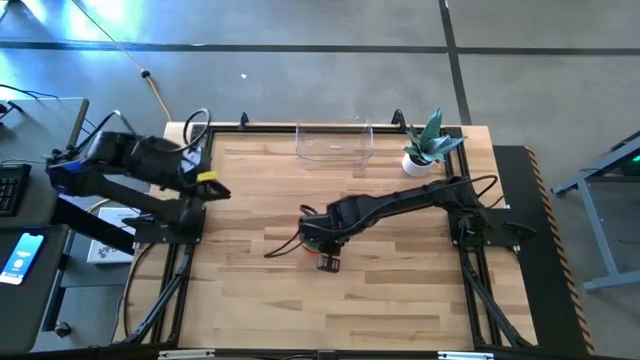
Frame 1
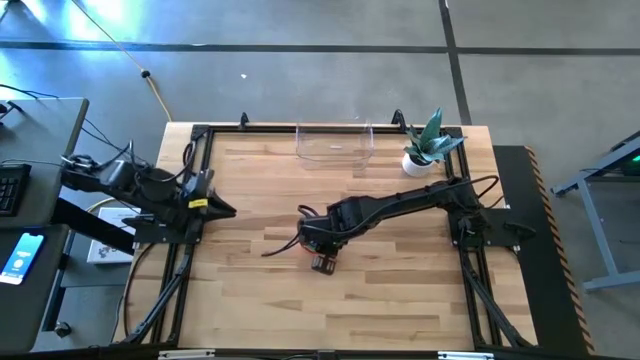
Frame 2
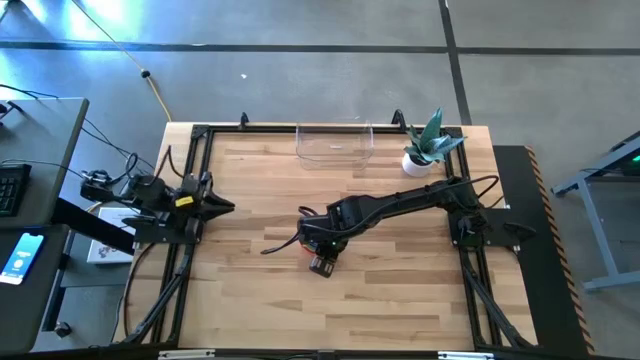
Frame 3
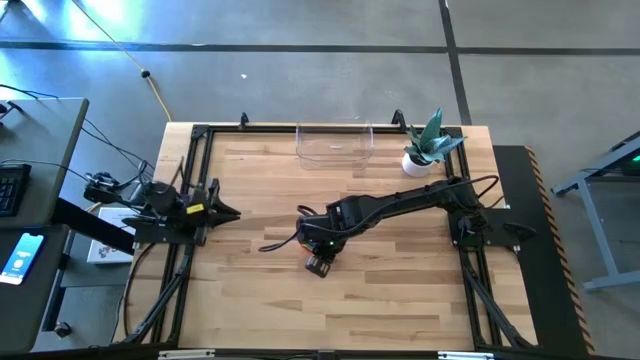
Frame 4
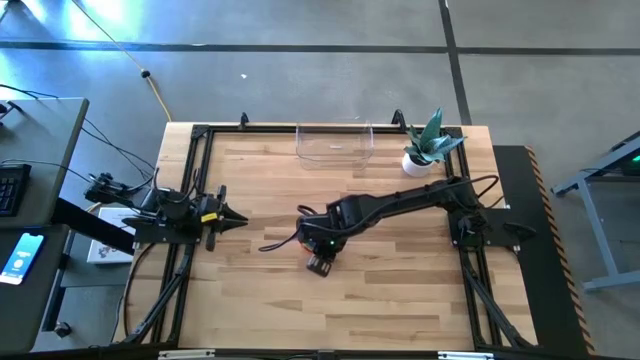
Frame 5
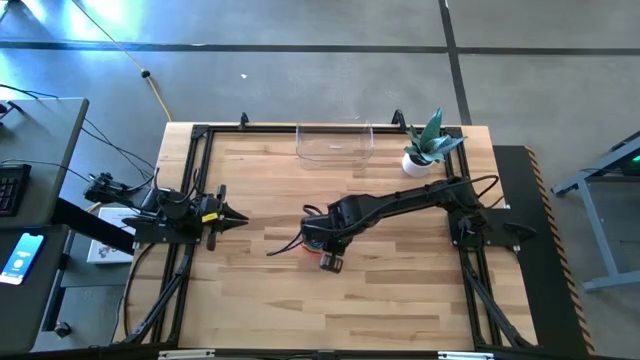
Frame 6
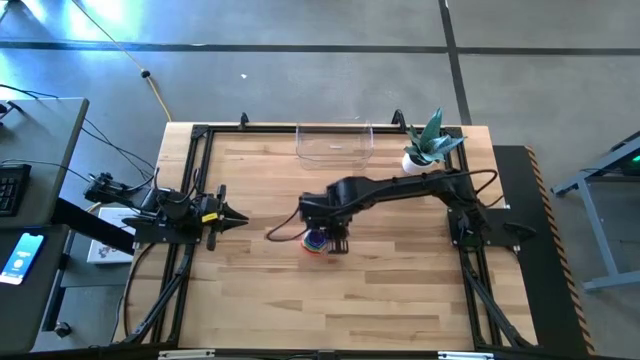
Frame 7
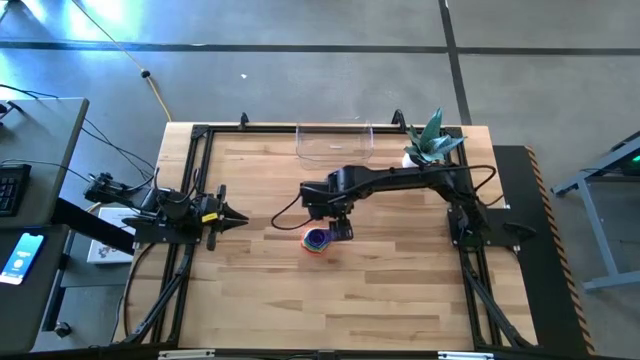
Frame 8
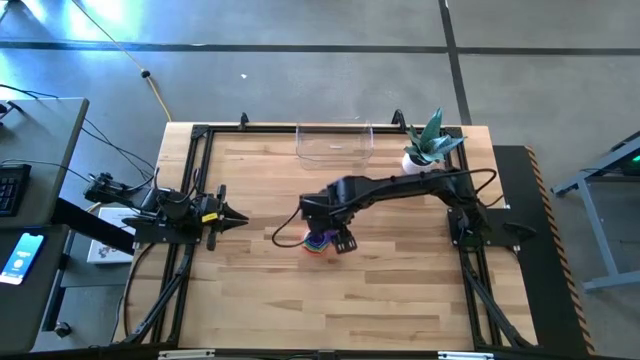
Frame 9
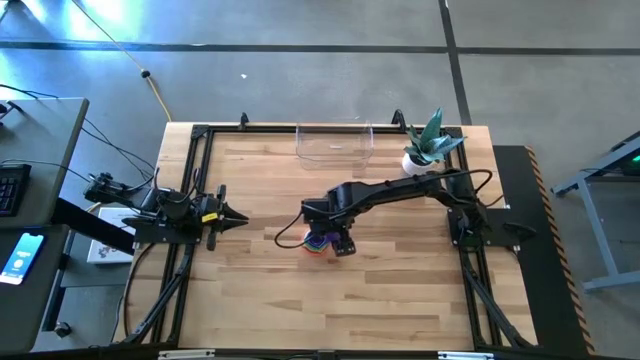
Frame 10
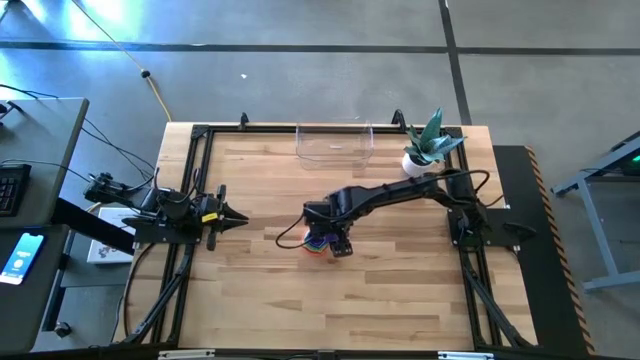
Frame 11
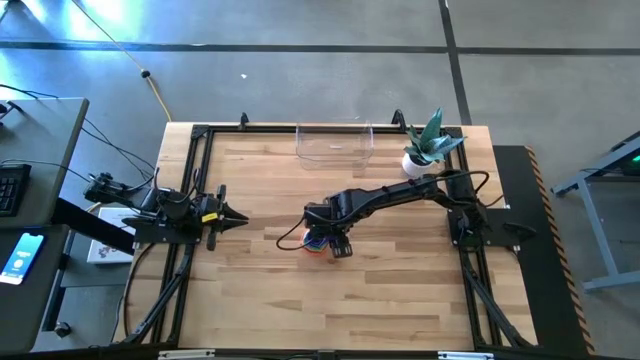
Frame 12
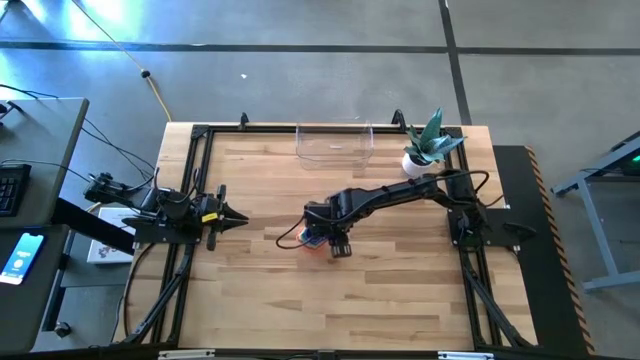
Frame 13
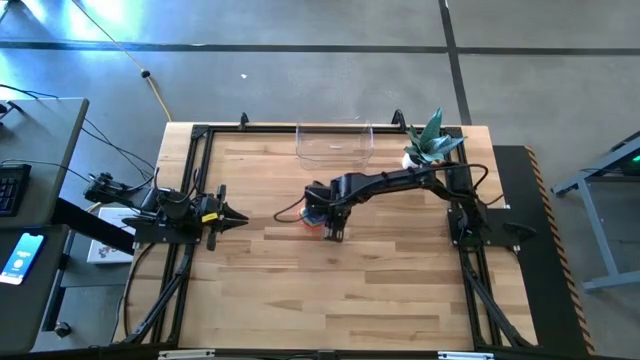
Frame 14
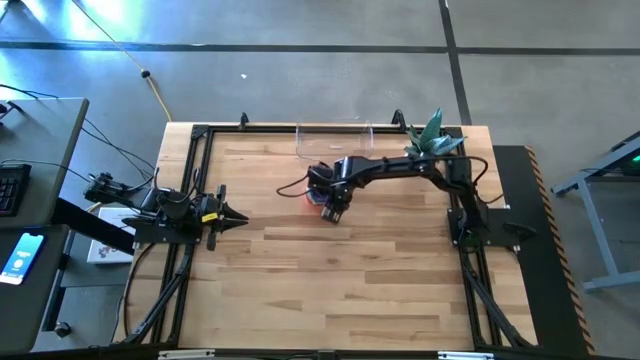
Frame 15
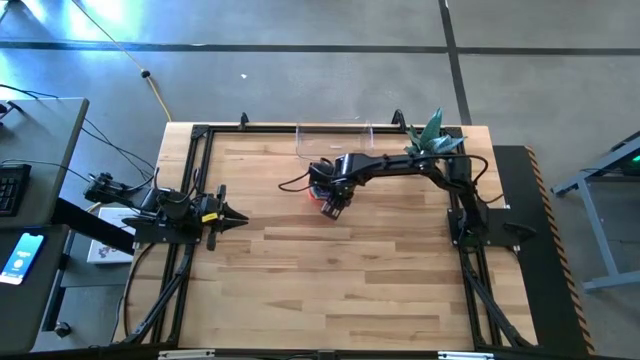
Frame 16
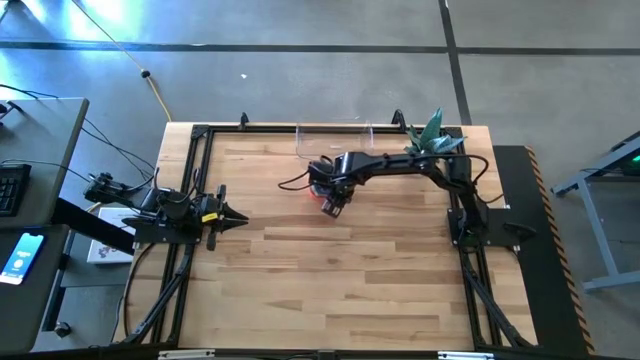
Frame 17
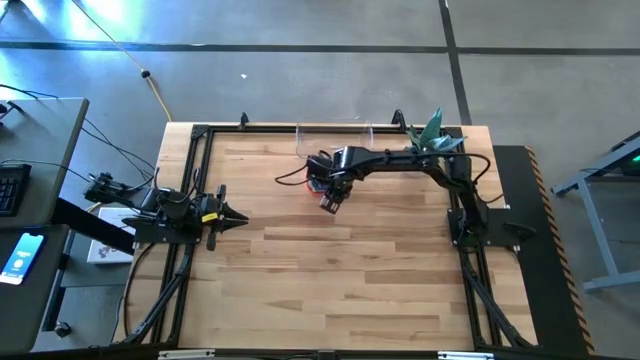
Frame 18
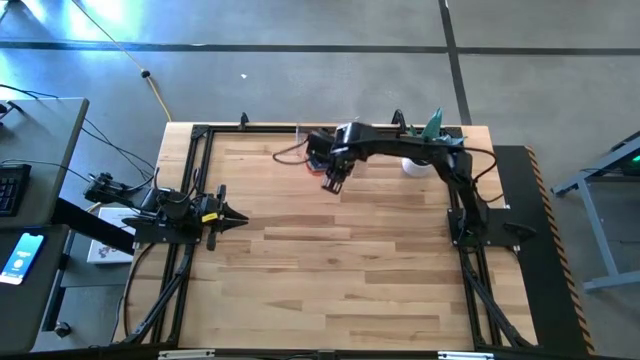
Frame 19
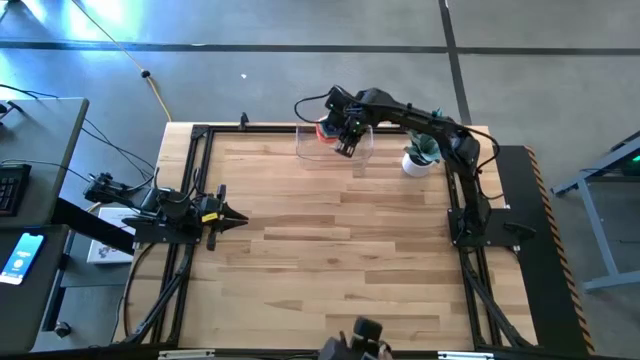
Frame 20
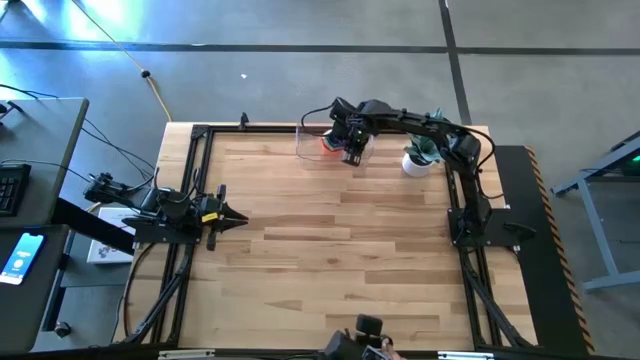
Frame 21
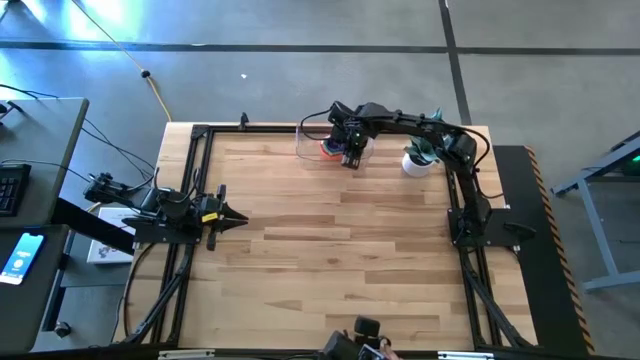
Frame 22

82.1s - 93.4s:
Task: Nest measuring cups in basket
Put the colored measuring cups on top of the transparent bin

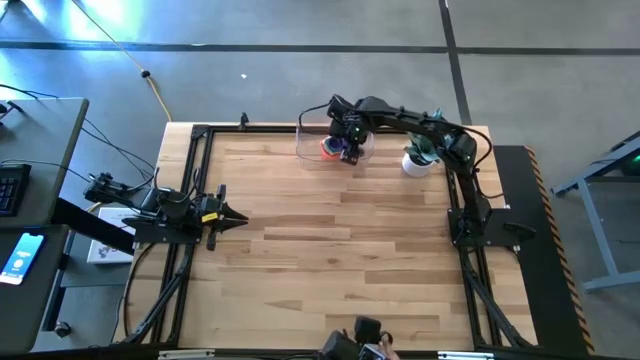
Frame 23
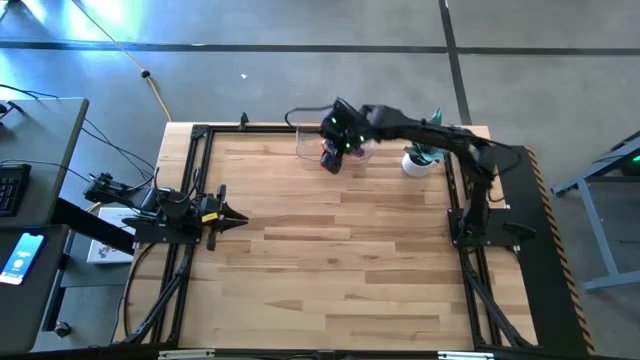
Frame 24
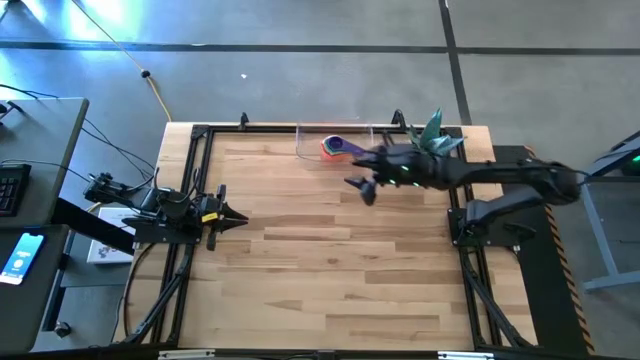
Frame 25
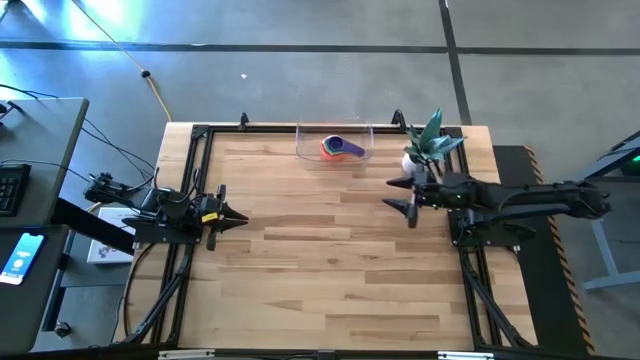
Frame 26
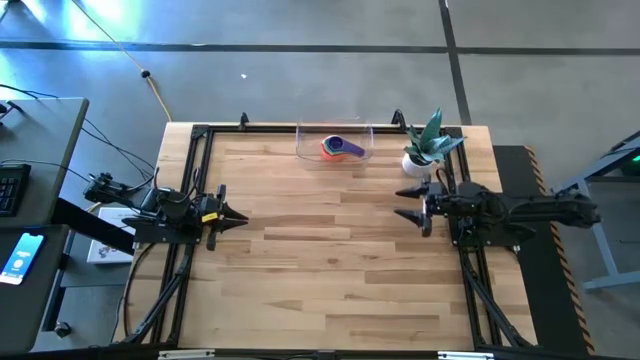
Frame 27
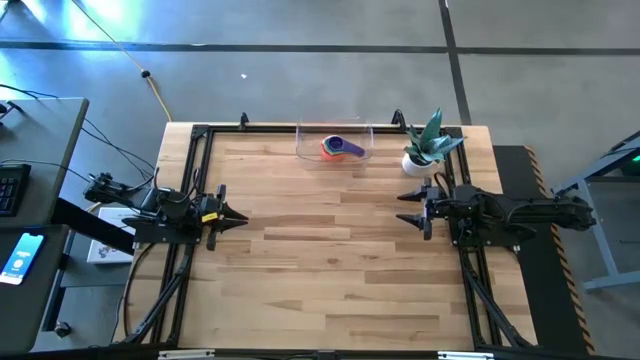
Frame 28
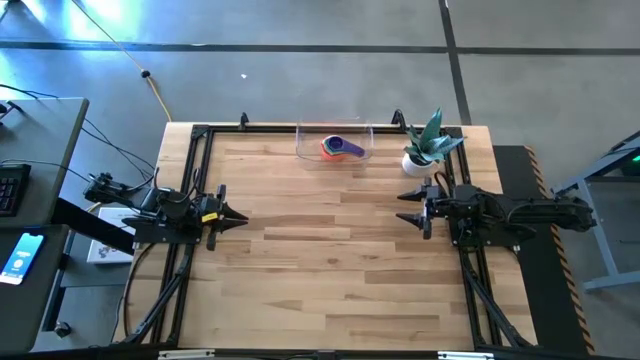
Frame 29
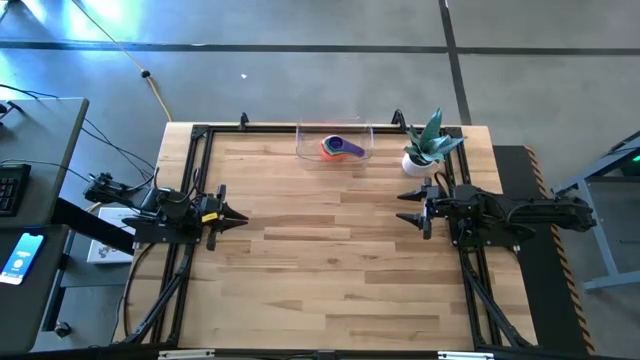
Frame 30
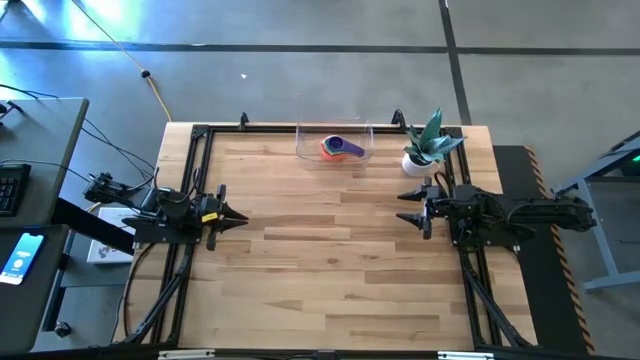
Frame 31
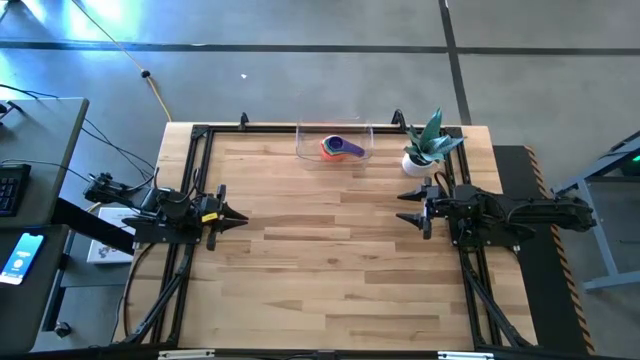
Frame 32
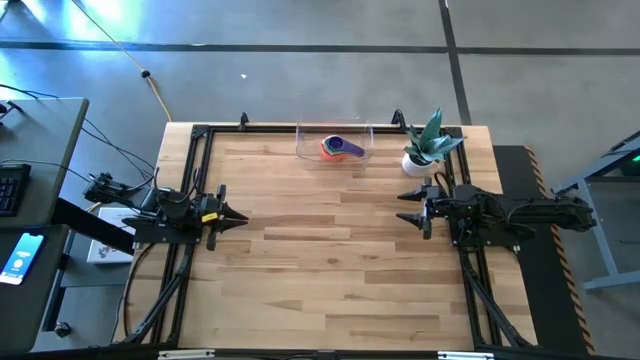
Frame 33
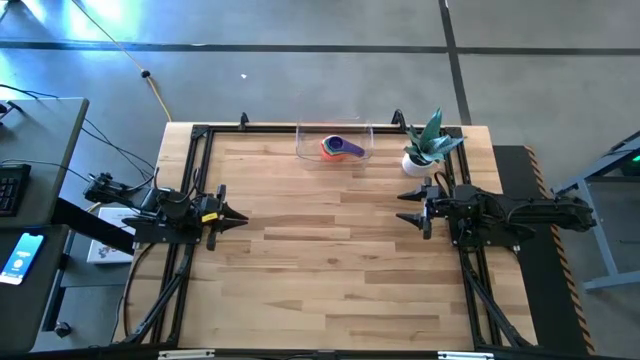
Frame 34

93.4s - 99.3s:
Return to Home Position

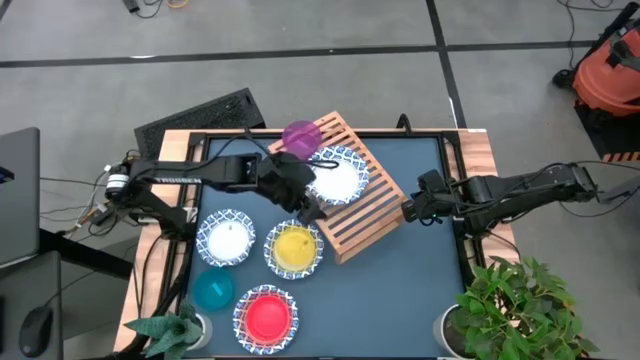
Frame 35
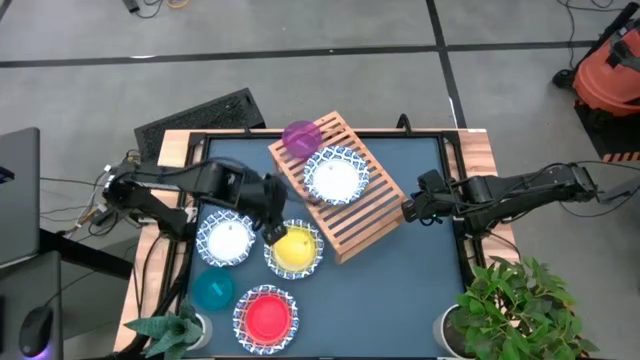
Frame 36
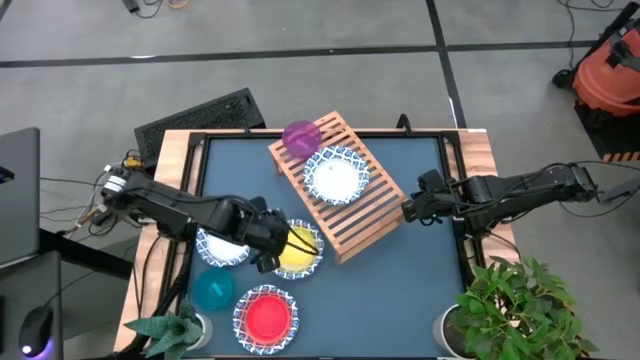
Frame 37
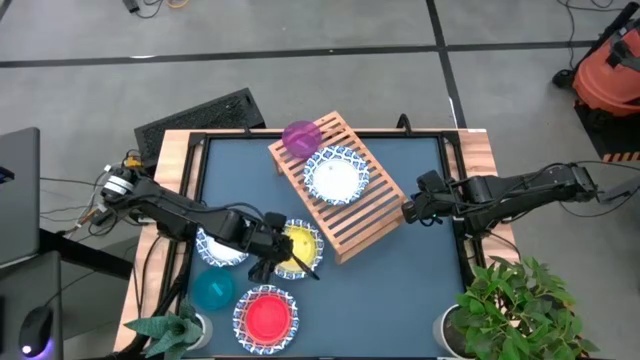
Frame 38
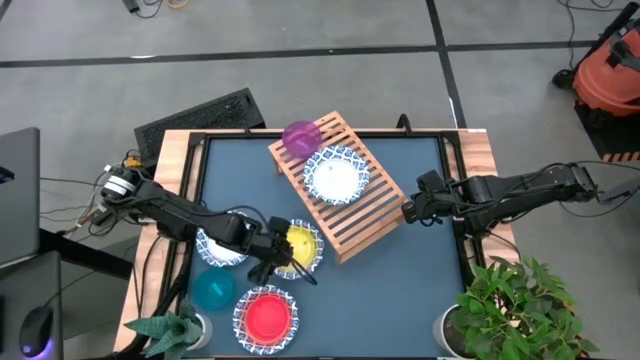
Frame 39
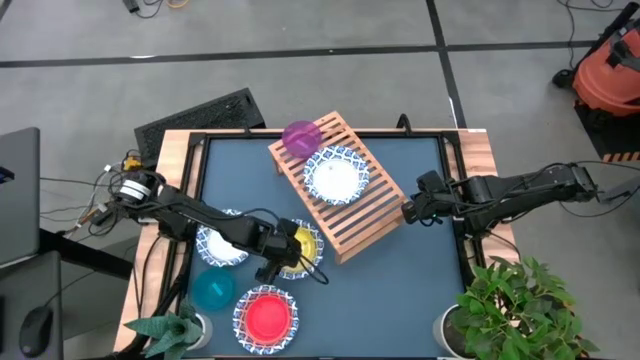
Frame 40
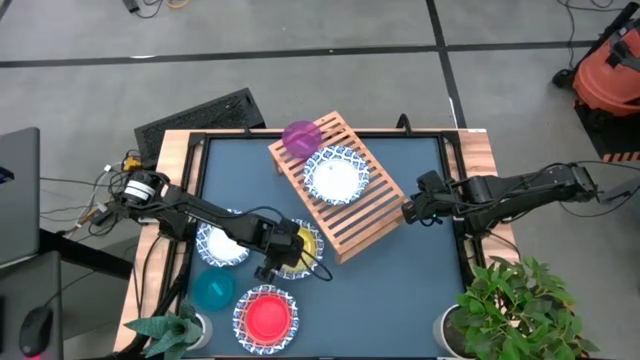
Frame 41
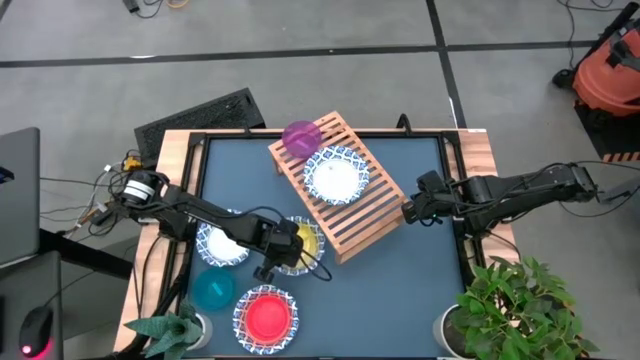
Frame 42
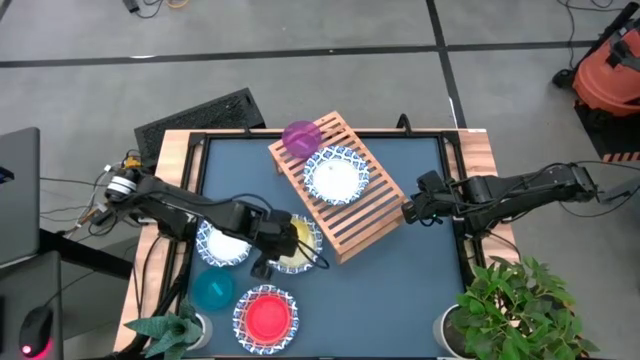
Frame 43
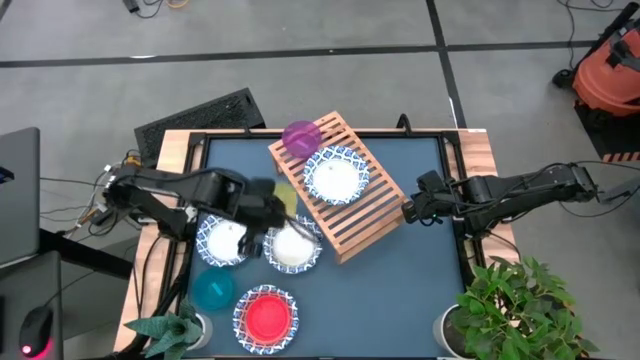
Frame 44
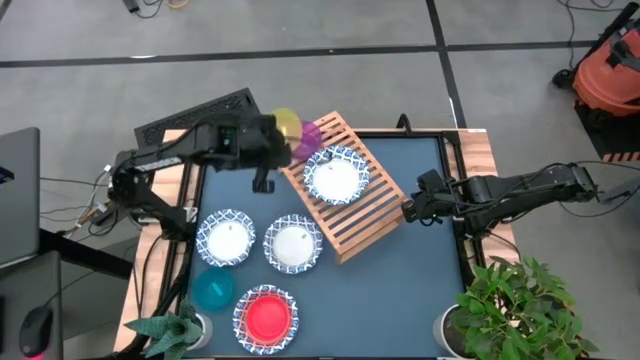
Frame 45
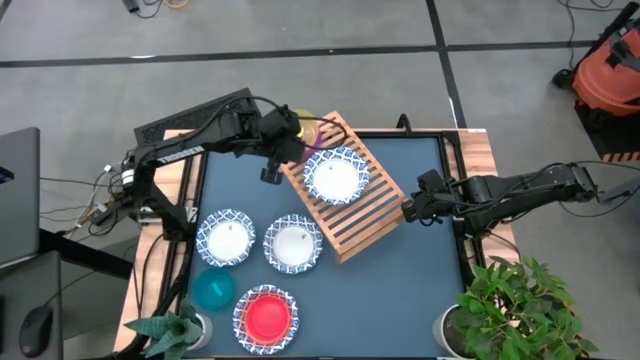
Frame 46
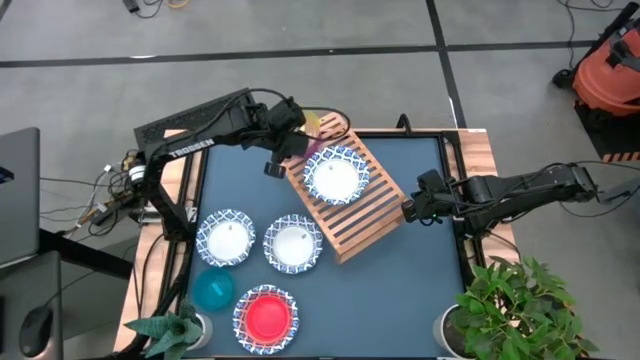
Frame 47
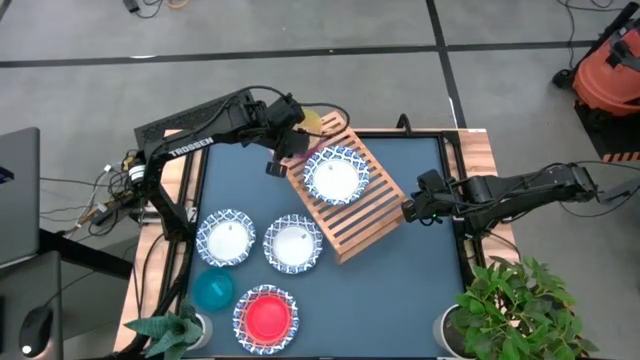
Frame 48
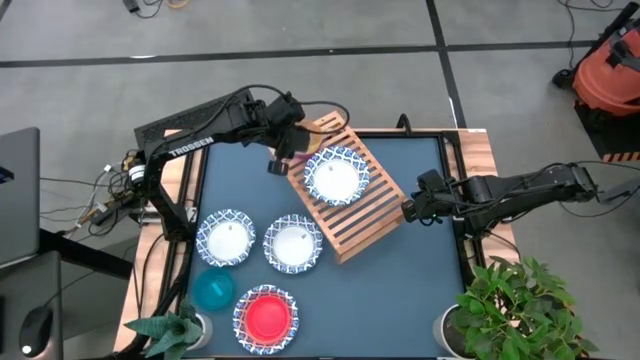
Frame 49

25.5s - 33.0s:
Task: Place and stack bowls onto a shelf
Stack the yellow bowl on top of the violet bowl on the shelf
